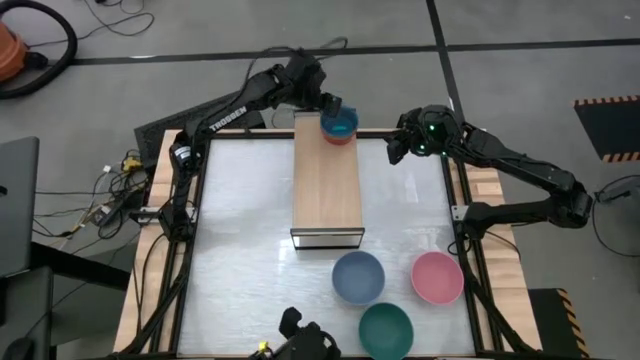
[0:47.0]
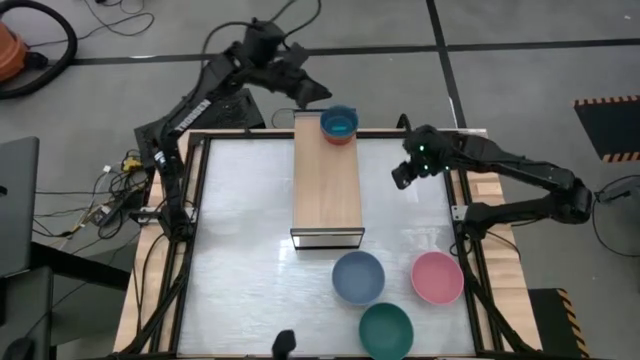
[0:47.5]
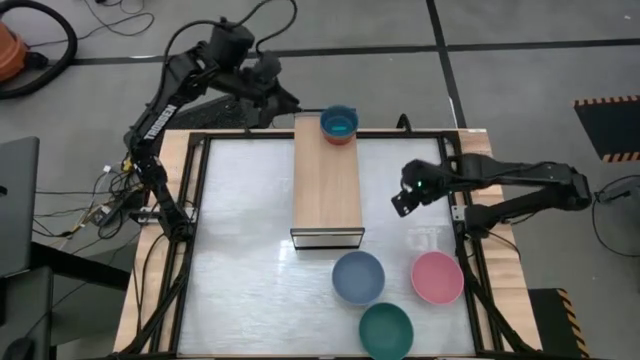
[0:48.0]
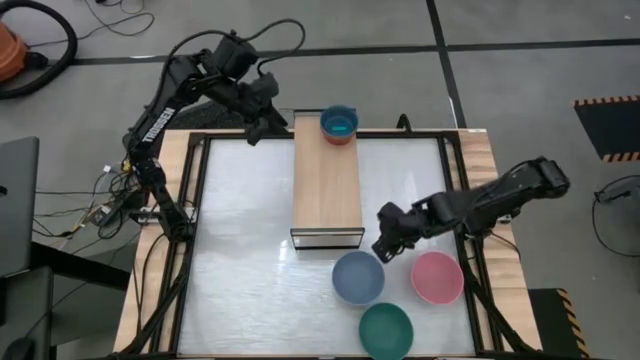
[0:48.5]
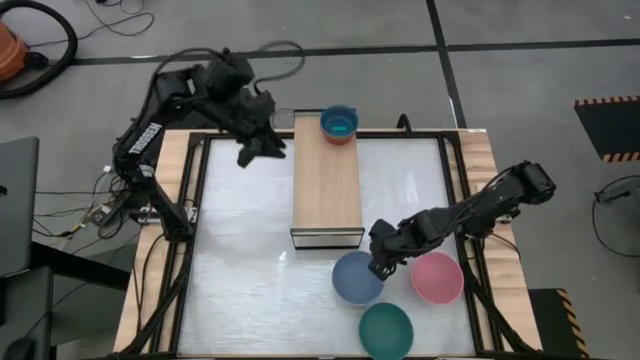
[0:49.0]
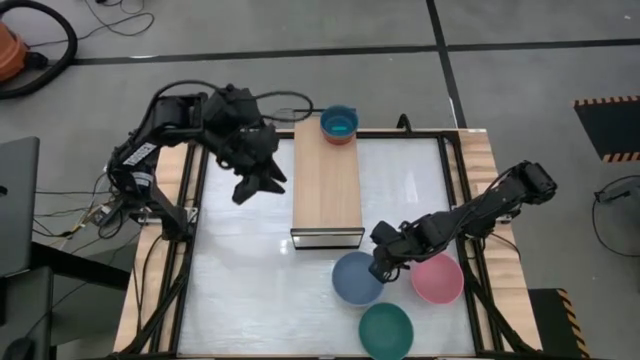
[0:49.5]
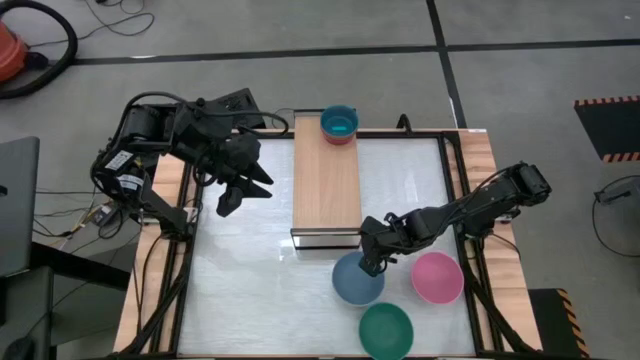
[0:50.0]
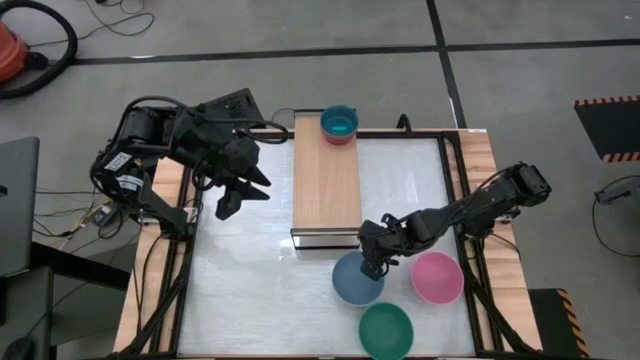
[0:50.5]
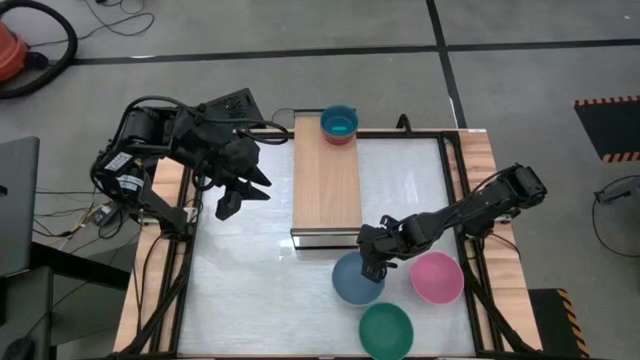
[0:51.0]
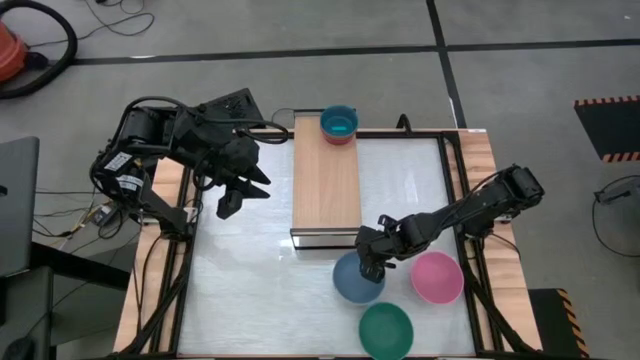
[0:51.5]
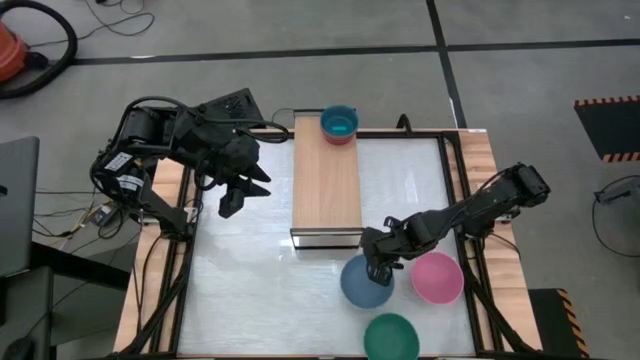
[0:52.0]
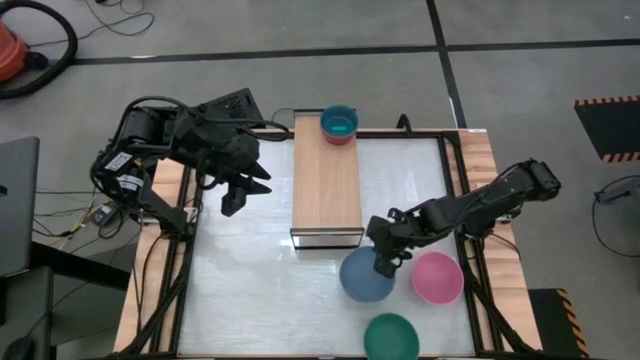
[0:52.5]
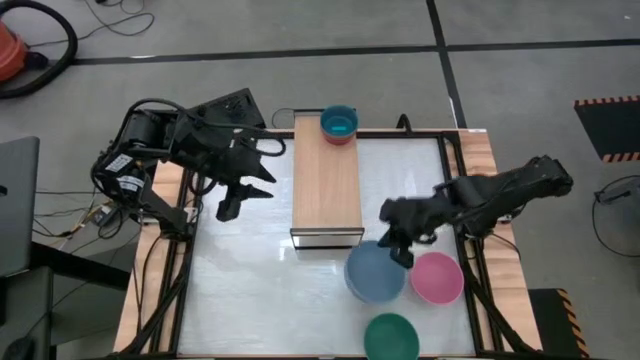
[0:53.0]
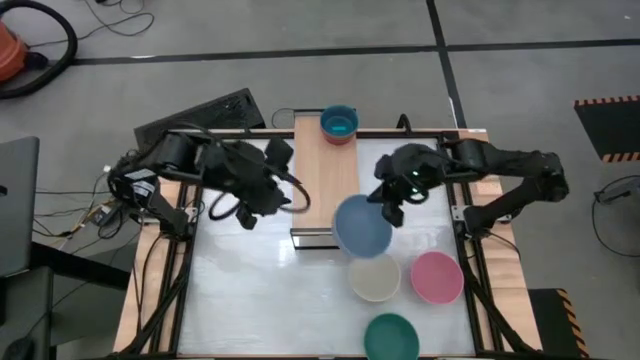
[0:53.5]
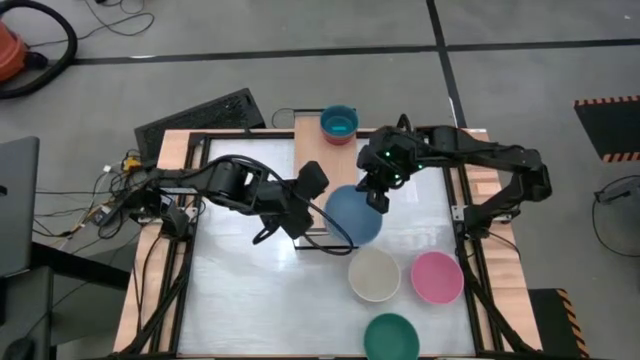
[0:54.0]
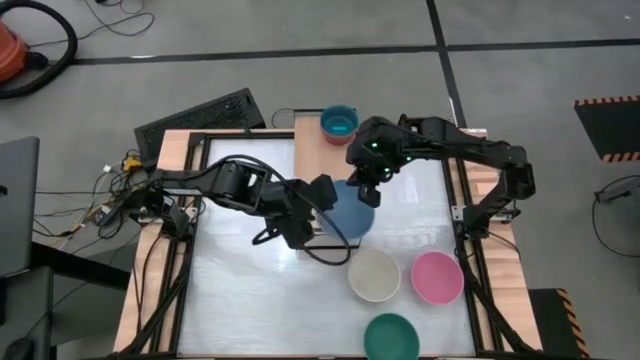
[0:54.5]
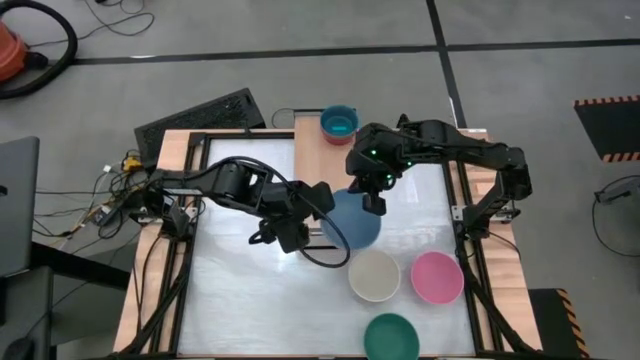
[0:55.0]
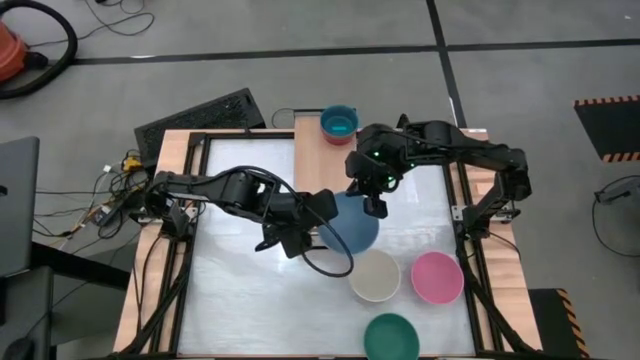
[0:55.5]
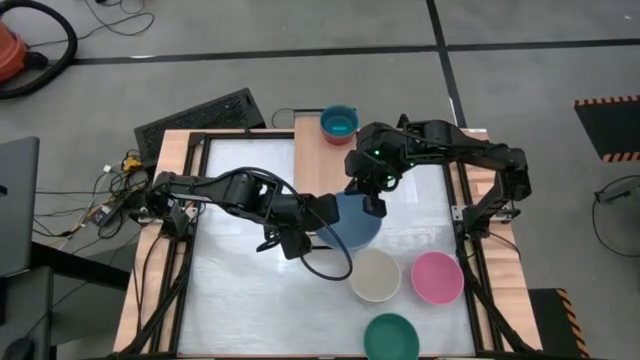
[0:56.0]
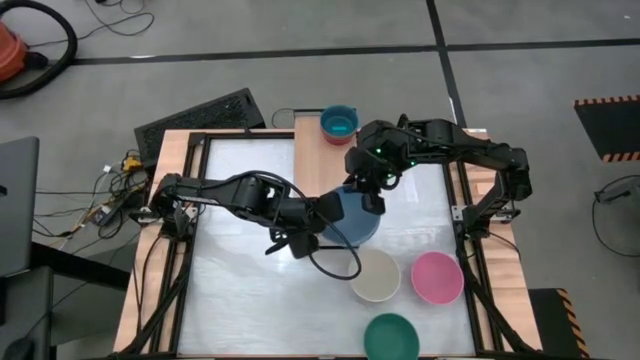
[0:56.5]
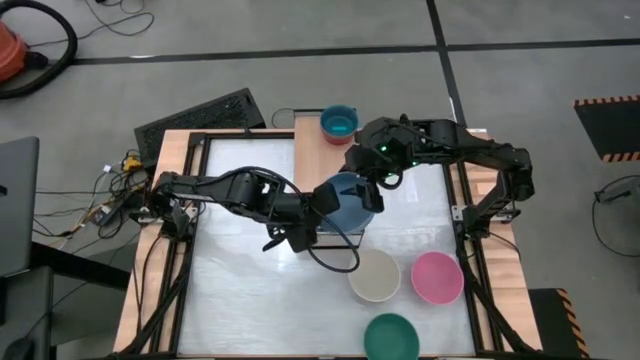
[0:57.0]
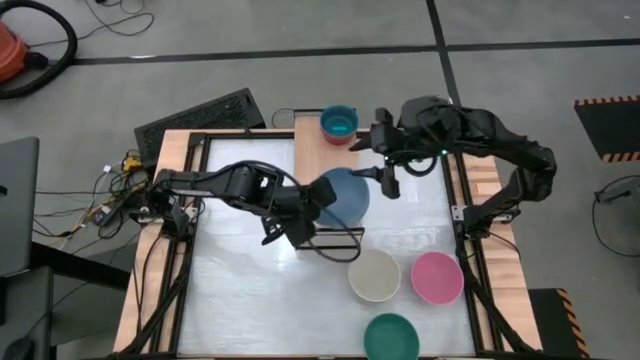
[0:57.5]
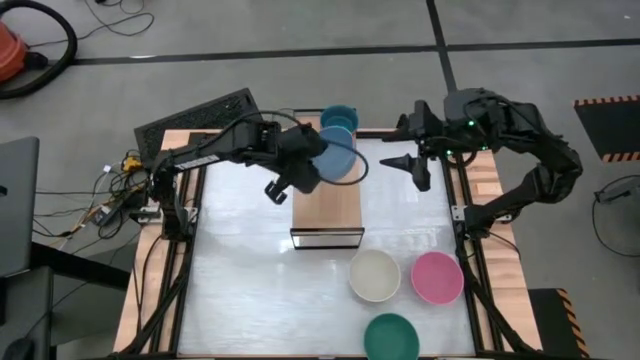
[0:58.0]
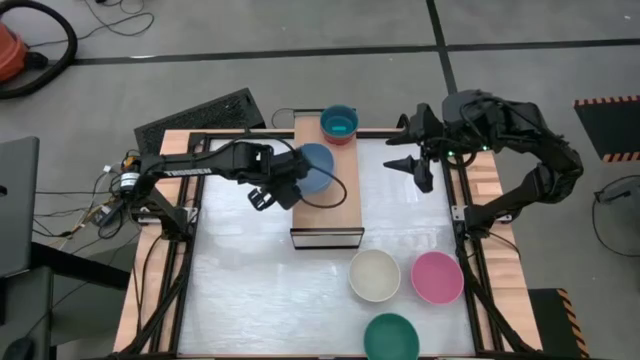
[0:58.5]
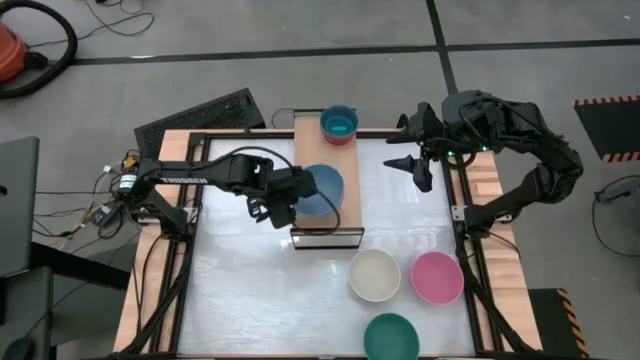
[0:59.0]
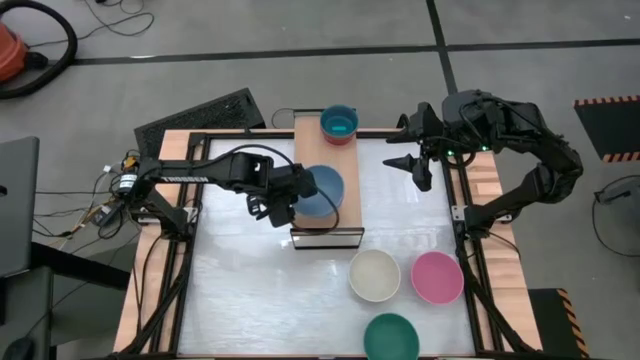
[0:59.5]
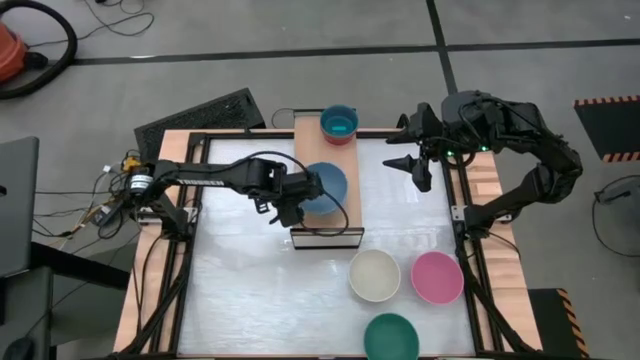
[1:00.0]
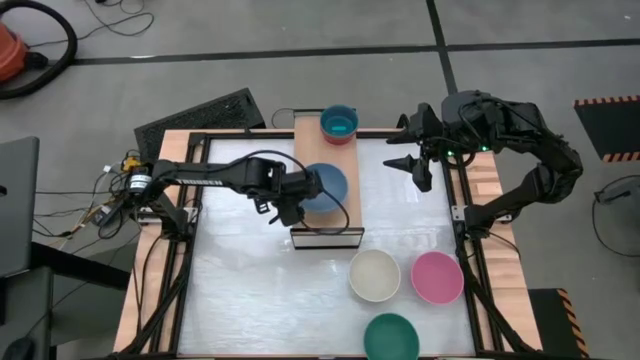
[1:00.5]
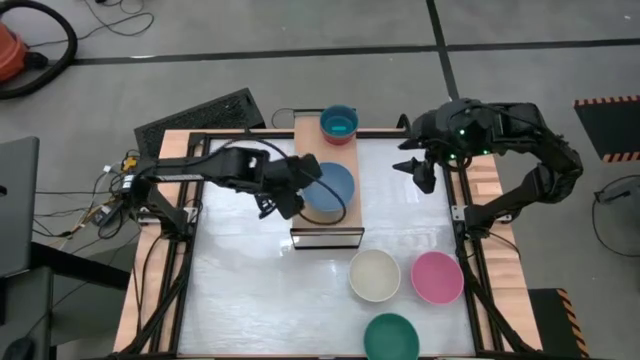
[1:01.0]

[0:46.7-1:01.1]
Task: Place and stack bowls onto a shelf
Put the dark blue bowl on the shelf

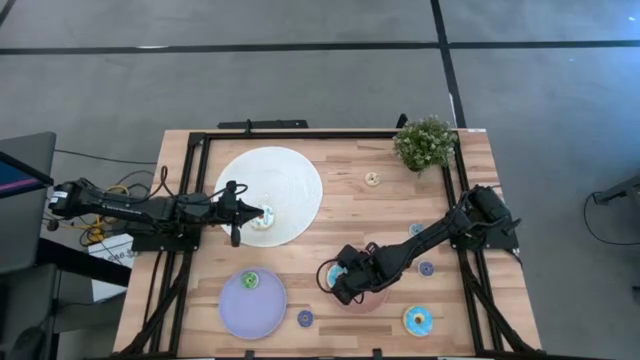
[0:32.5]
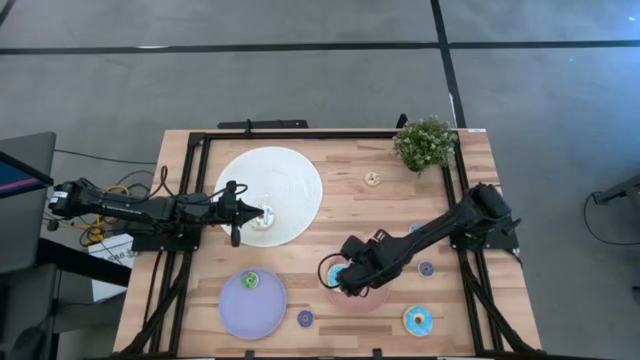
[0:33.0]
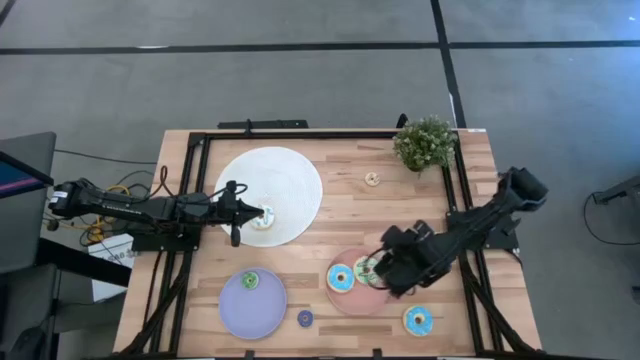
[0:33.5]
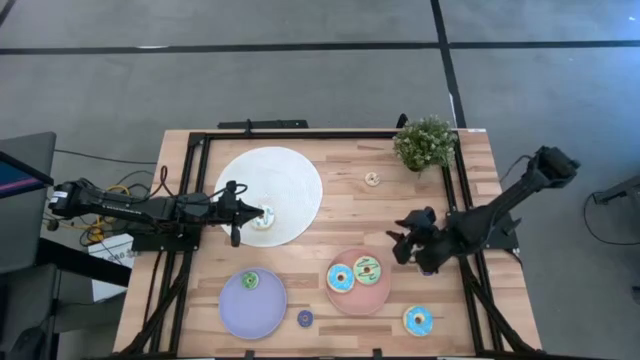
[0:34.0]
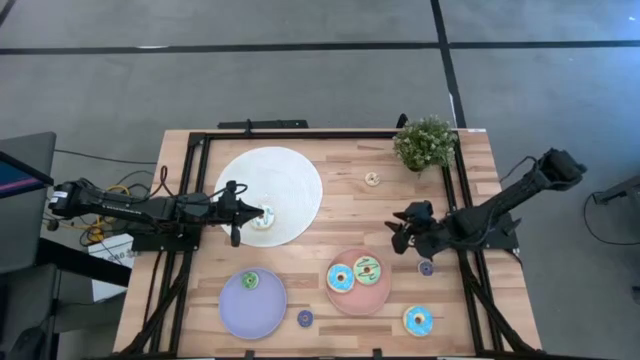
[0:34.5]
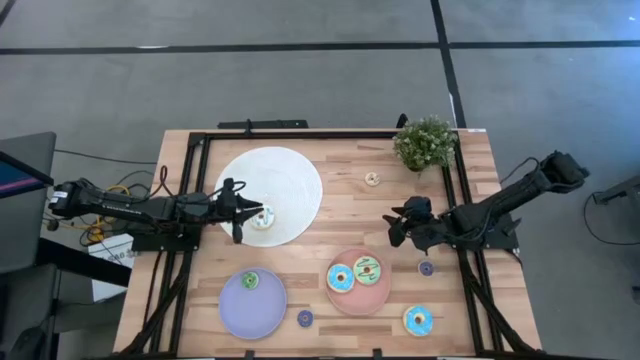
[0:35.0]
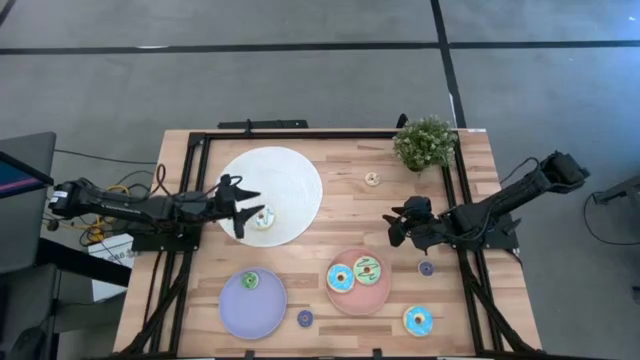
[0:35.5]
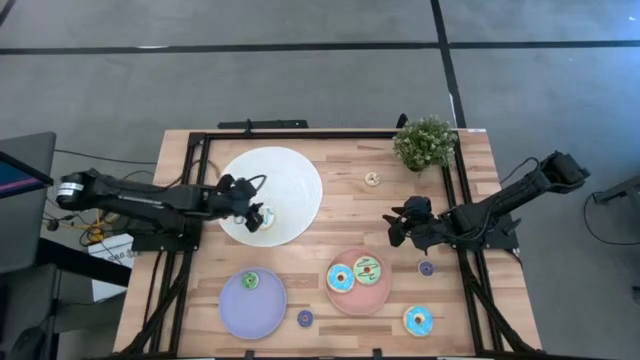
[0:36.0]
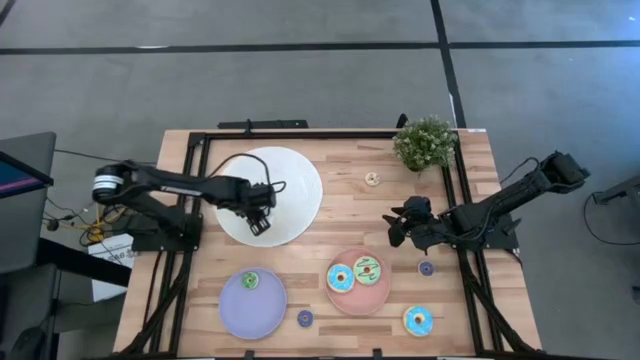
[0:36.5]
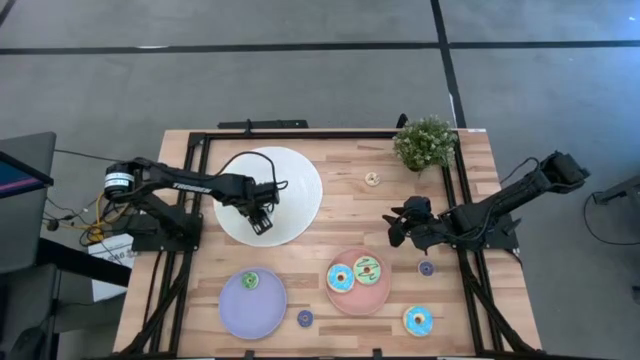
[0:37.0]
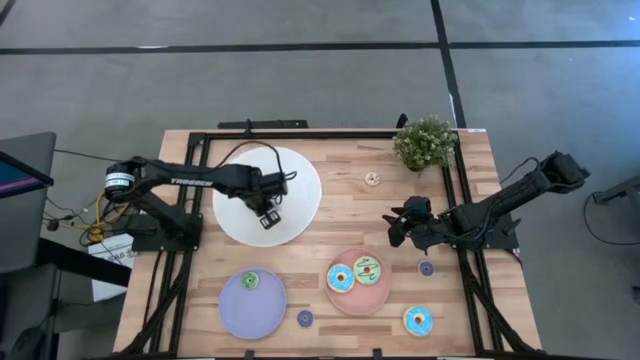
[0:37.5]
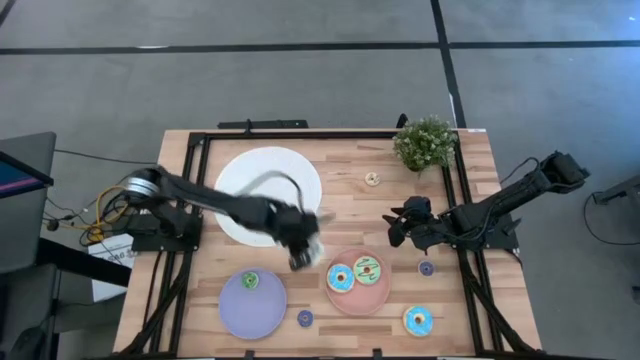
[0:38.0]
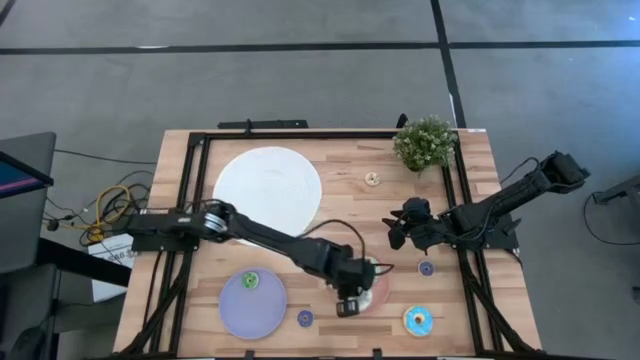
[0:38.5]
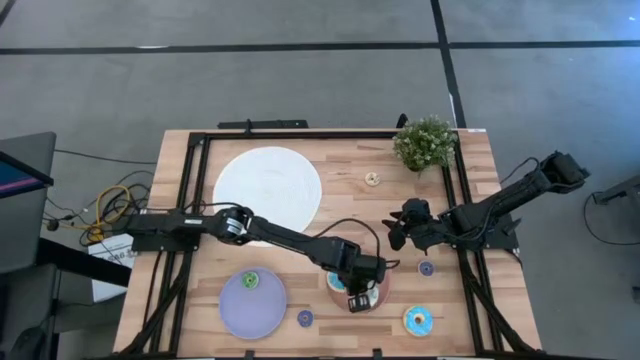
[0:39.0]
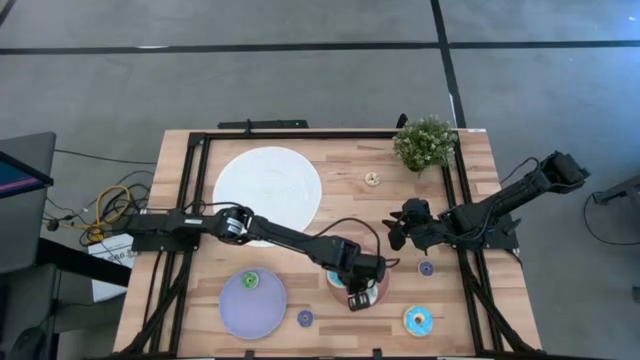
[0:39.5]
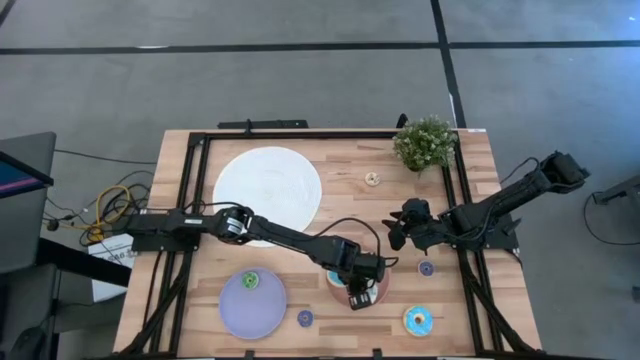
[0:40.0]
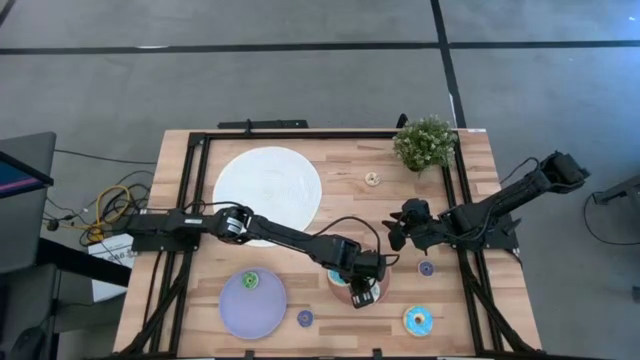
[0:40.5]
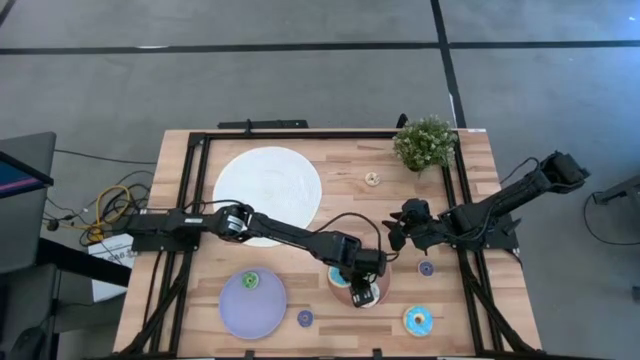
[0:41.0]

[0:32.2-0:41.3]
Task: Pick & Place donuts
Put the large white donut on the pink plate
